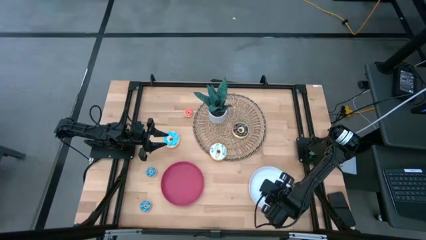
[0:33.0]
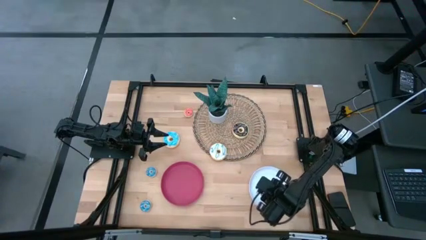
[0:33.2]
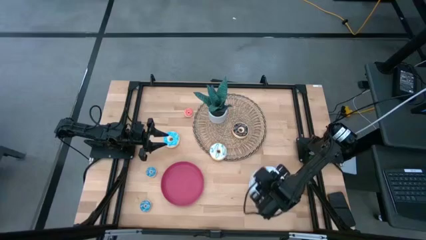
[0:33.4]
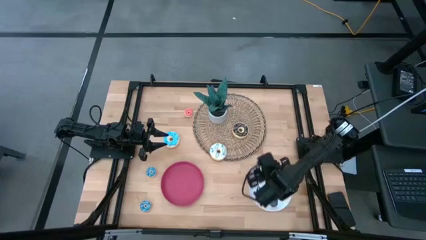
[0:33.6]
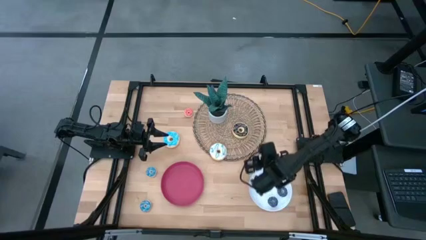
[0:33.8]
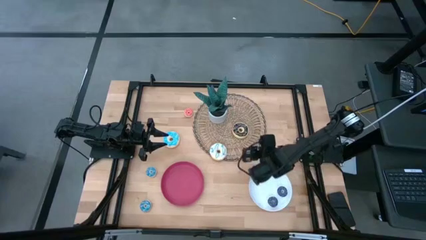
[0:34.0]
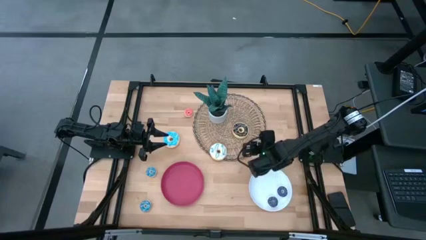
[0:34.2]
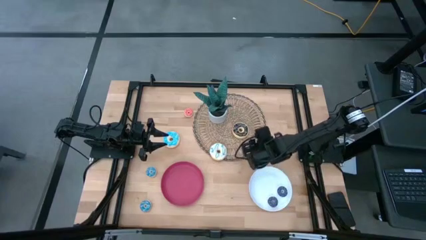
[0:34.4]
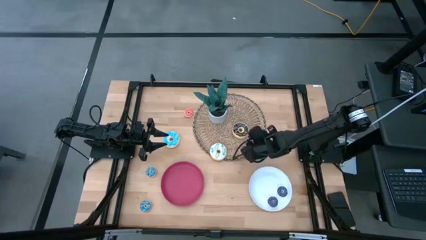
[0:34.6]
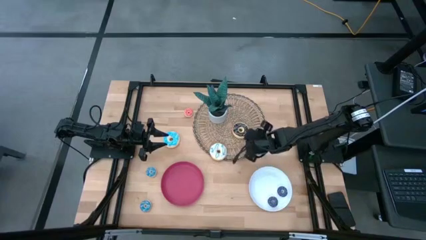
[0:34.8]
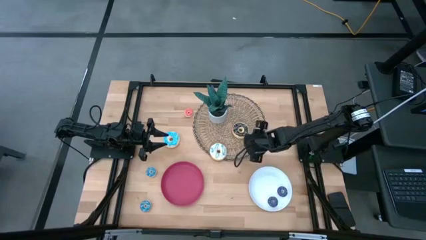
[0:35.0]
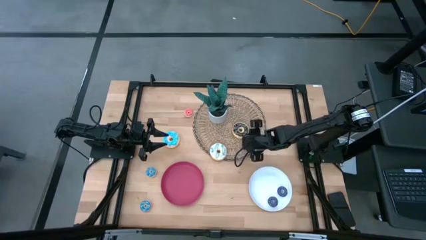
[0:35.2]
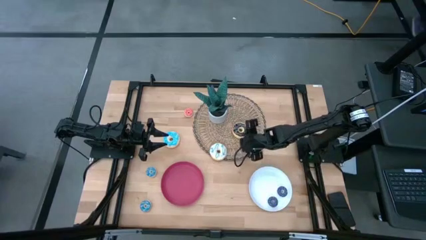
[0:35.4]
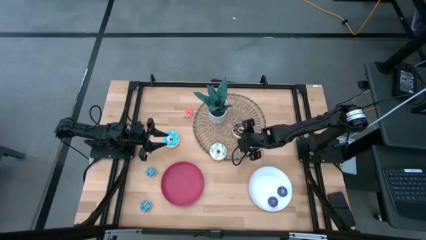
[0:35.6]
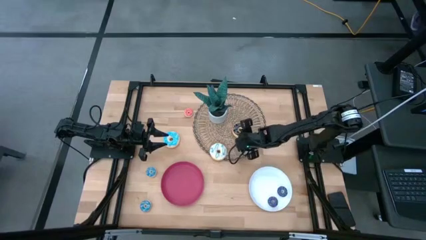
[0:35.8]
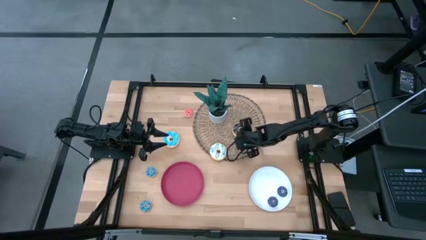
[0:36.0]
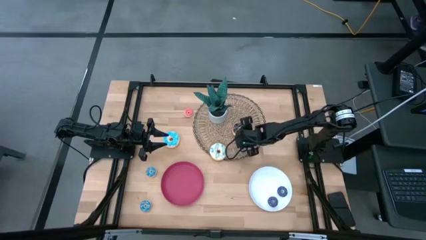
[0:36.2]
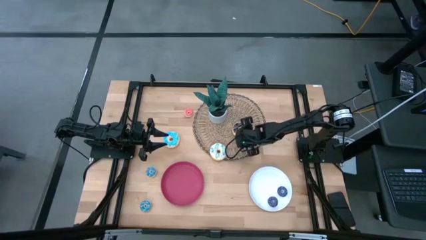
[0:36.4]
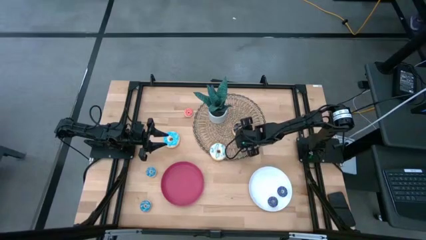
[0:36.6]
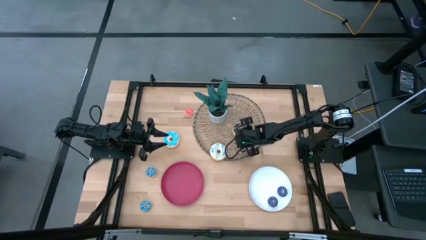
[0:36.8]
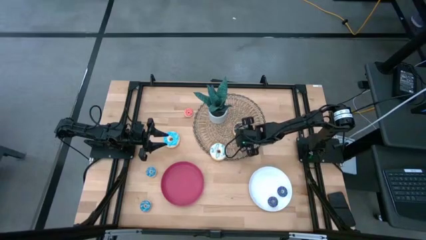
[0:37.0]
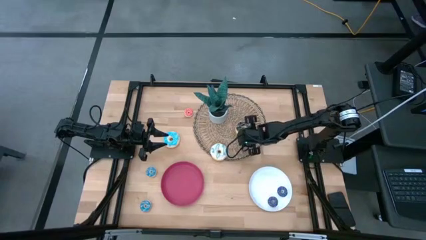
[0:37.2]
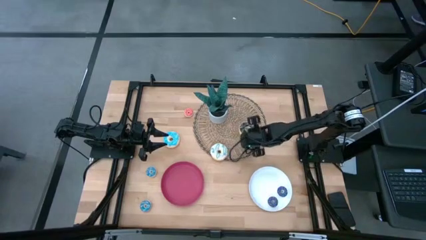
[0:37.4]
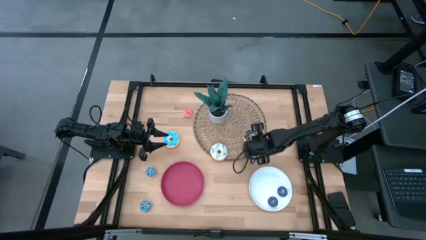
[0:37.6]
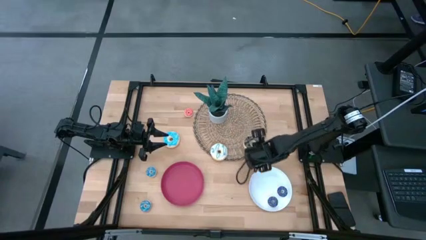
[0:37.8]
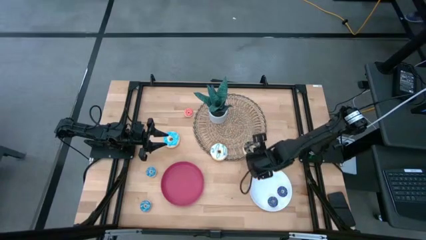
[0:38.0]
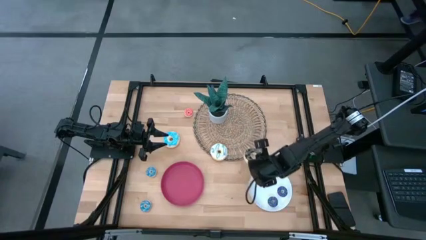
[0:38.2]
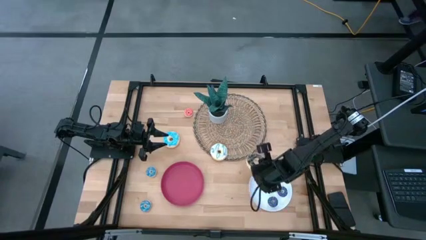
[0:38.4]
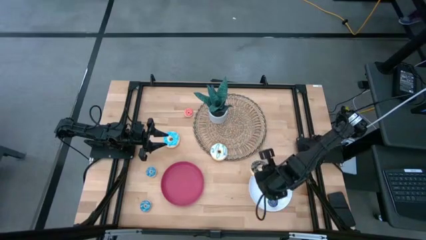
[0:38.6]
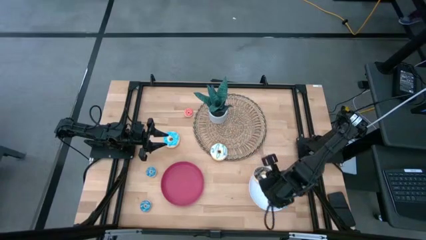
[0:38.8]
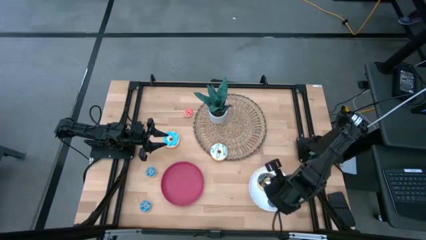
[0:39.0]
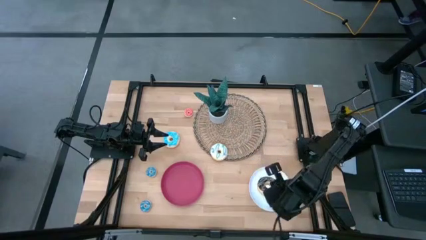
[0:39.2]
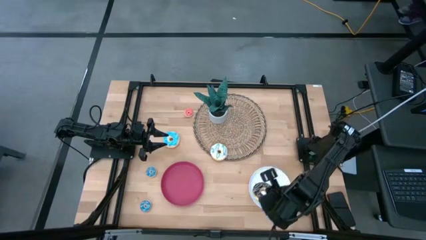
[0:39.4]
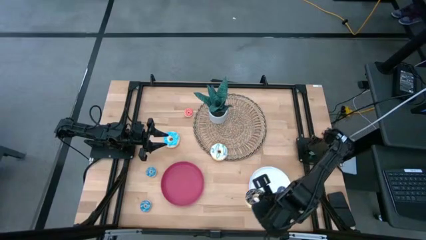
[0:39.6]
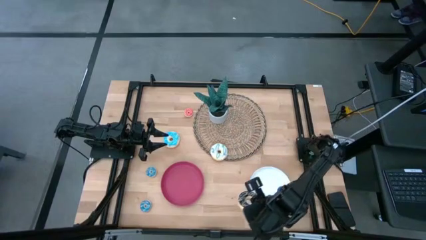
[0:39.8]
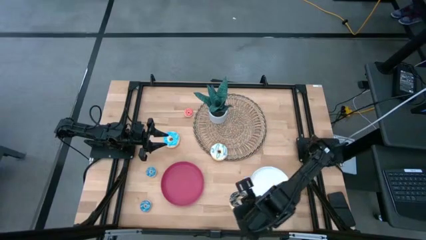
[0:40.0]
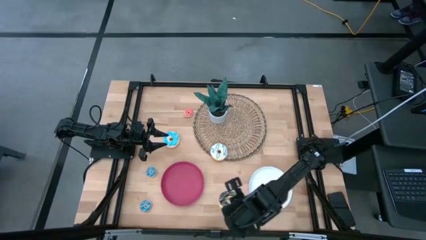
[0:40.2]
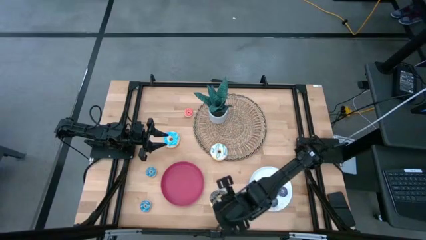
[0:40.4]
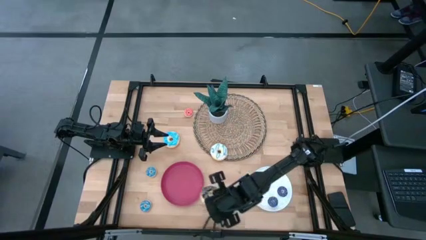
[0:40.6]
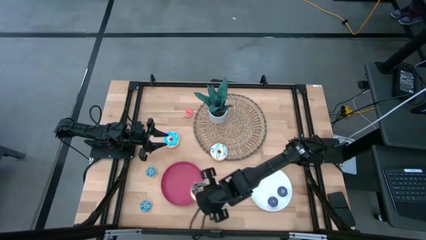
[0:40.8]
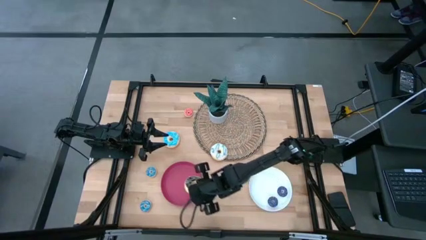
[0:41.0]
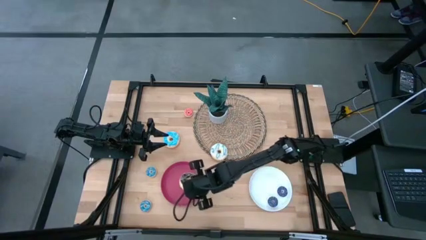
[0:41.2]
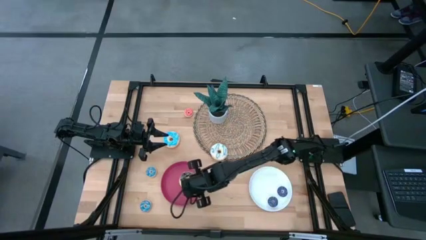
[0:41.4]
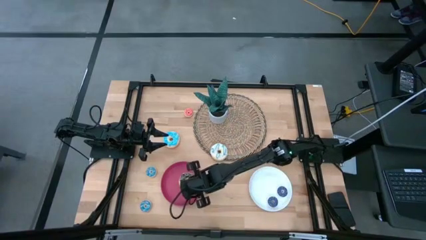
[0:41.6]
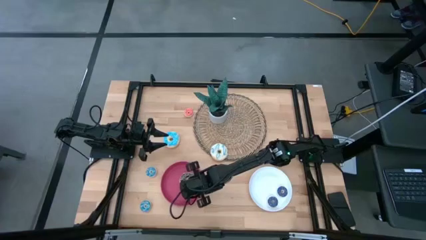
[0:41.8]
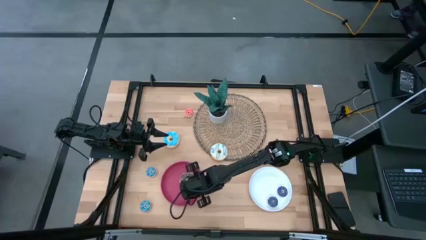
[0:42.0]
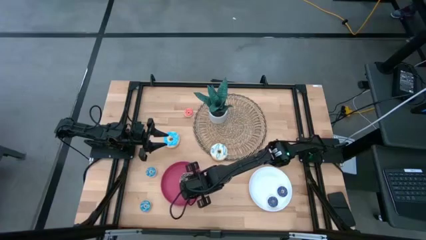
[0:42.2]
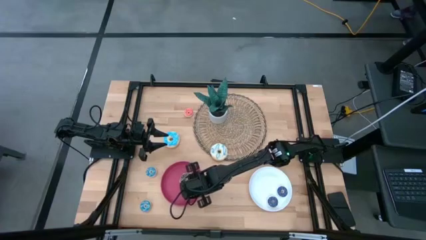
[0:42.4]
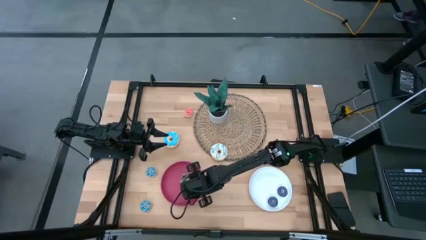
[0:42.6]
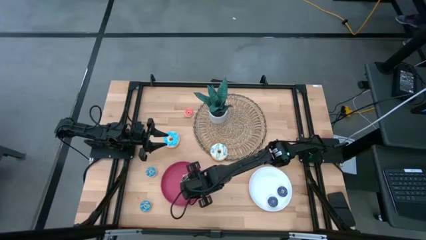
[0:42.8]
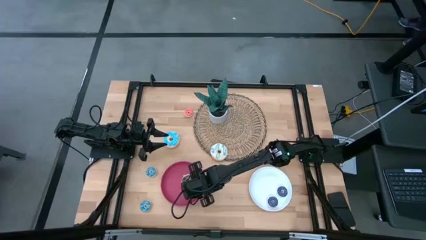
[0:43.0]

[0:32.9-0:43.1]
Task: Pick & Place donuts
Put the black donut on the dark pink plate
